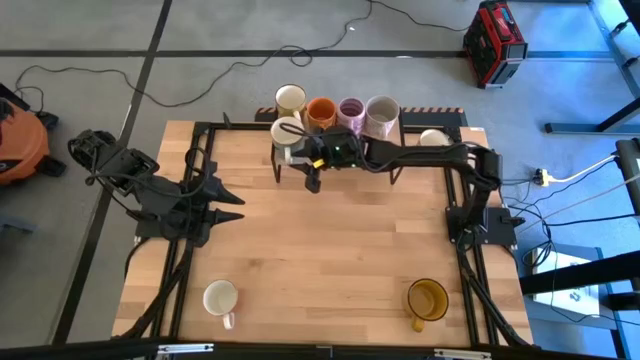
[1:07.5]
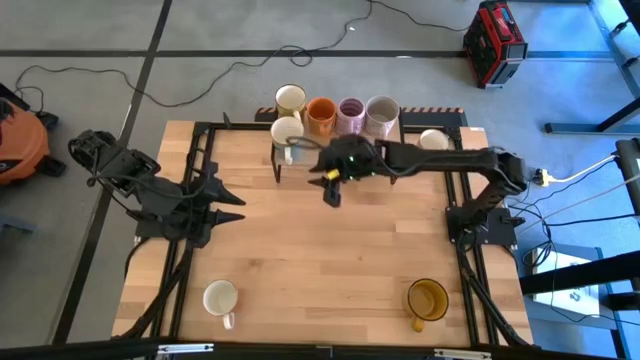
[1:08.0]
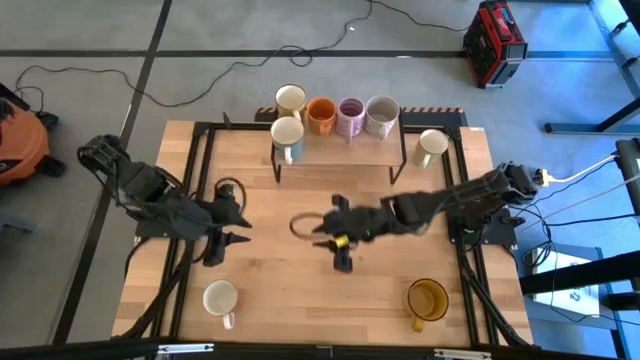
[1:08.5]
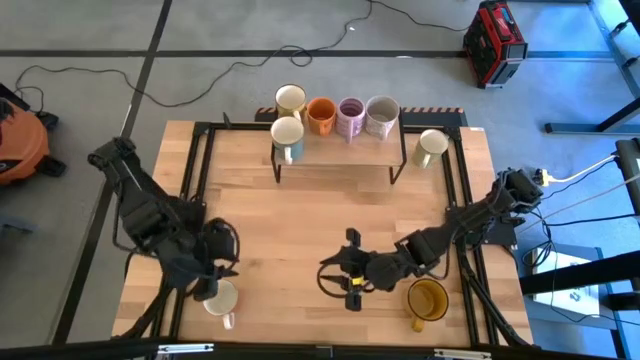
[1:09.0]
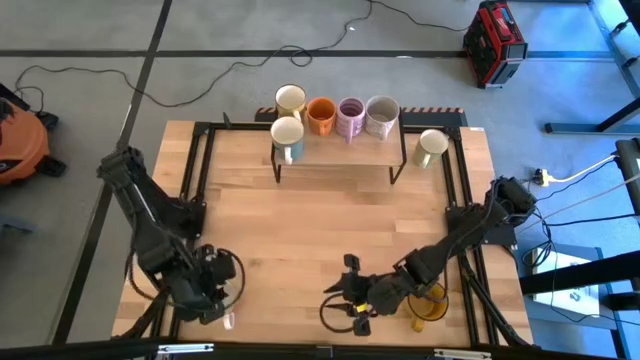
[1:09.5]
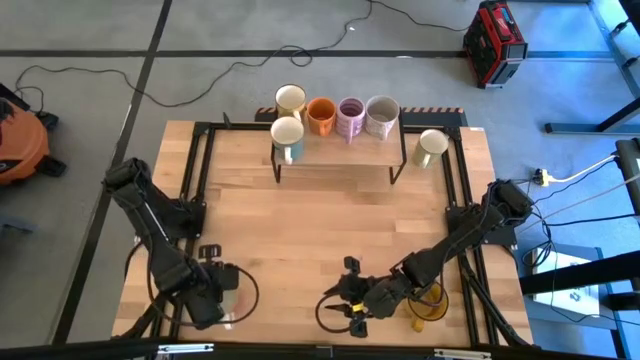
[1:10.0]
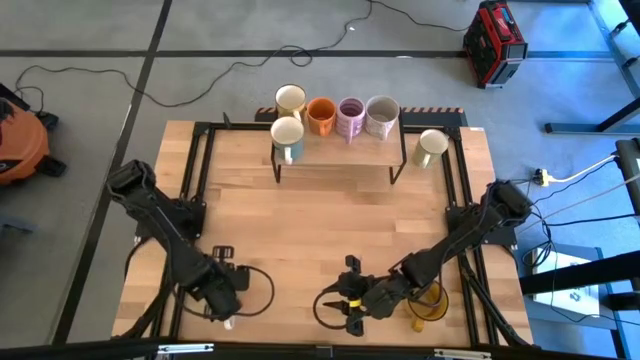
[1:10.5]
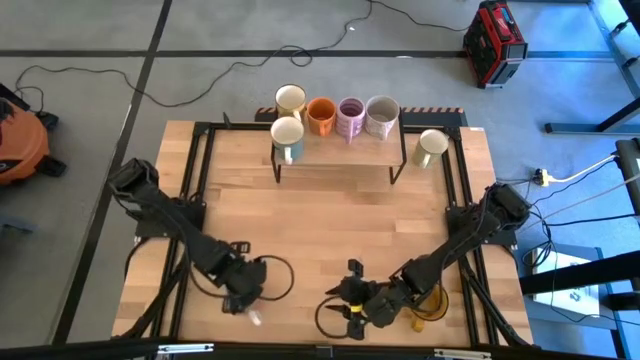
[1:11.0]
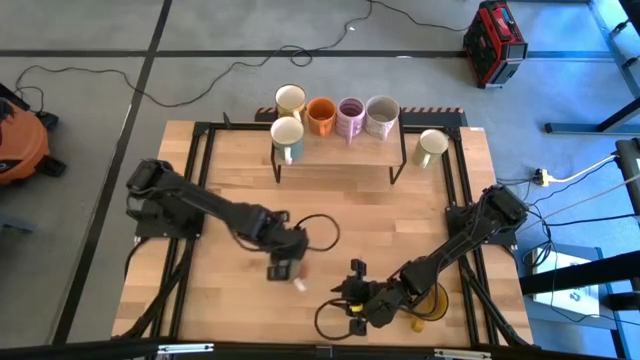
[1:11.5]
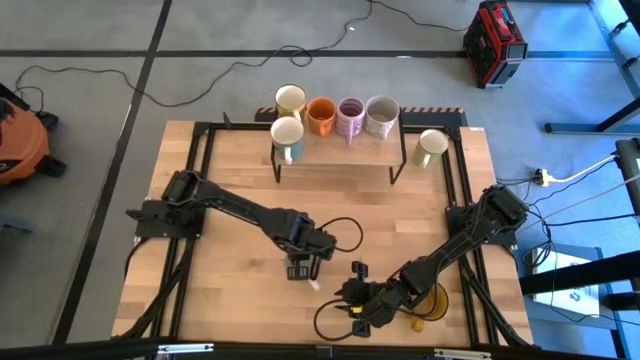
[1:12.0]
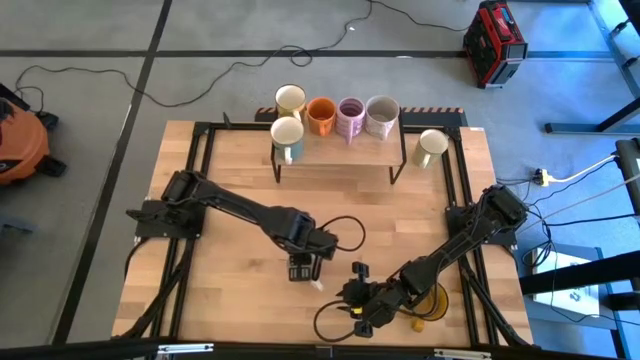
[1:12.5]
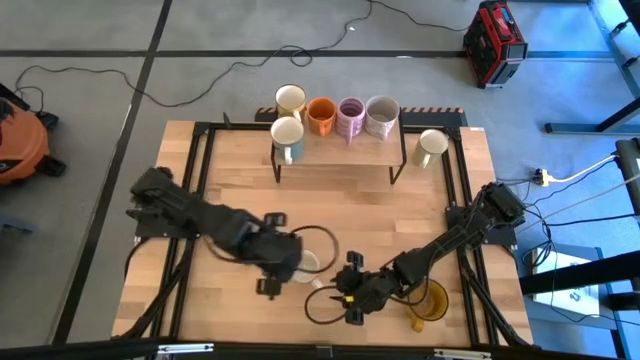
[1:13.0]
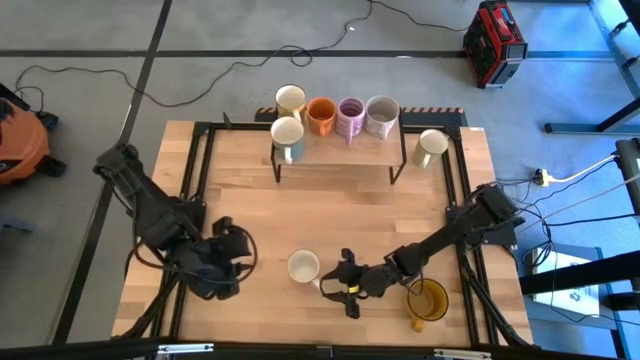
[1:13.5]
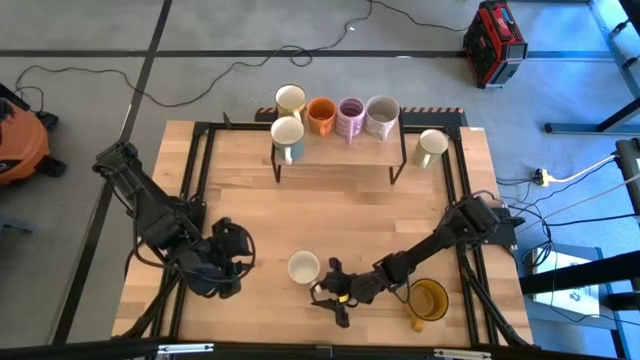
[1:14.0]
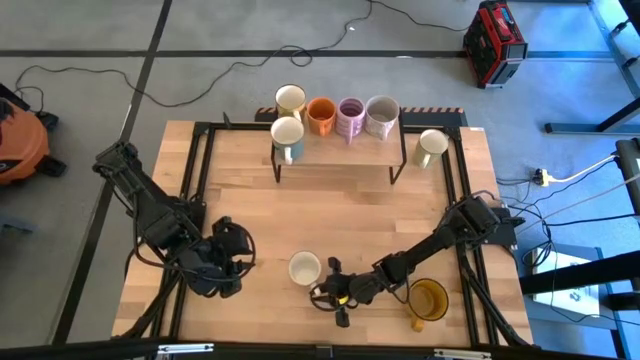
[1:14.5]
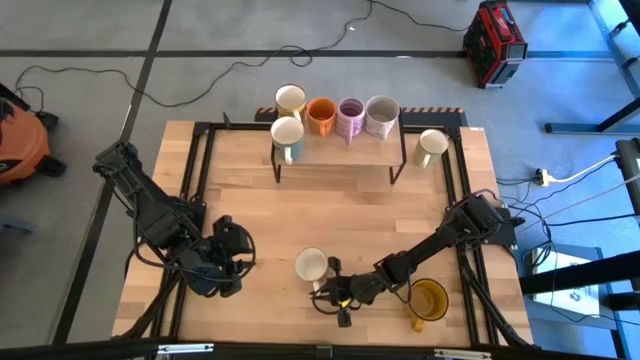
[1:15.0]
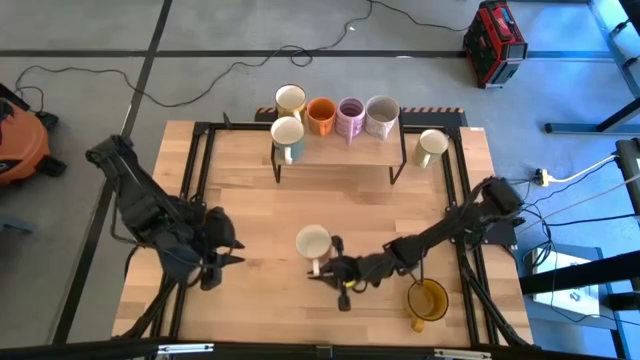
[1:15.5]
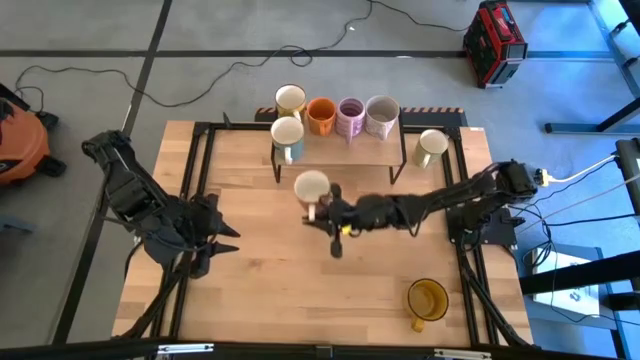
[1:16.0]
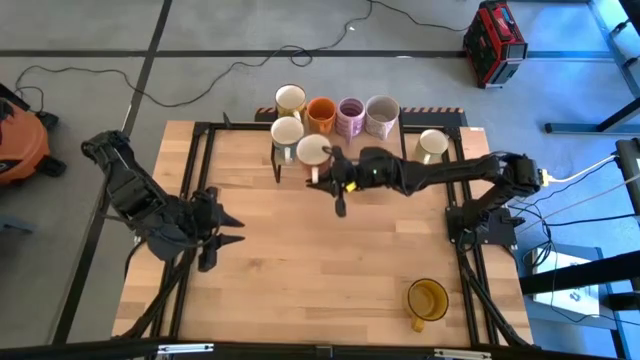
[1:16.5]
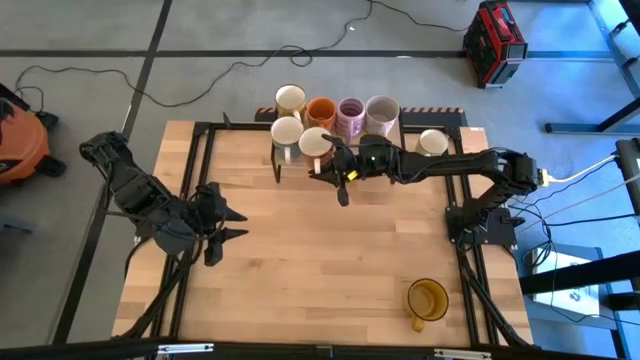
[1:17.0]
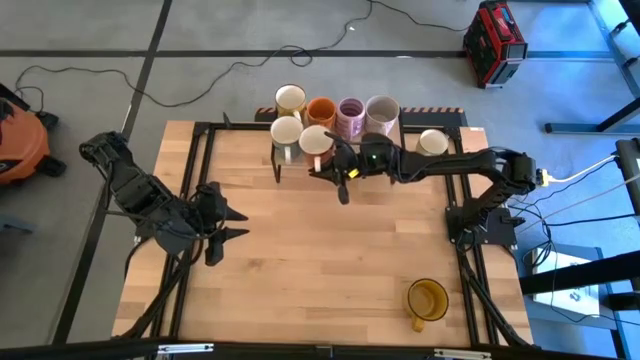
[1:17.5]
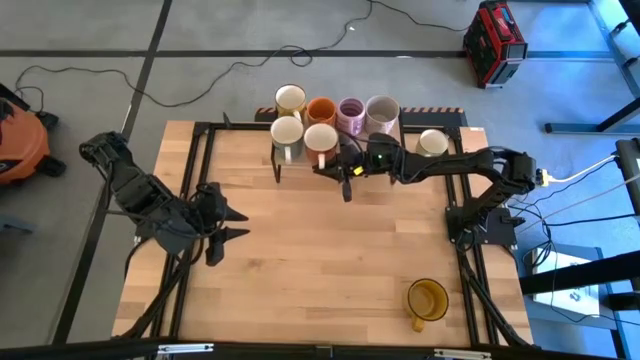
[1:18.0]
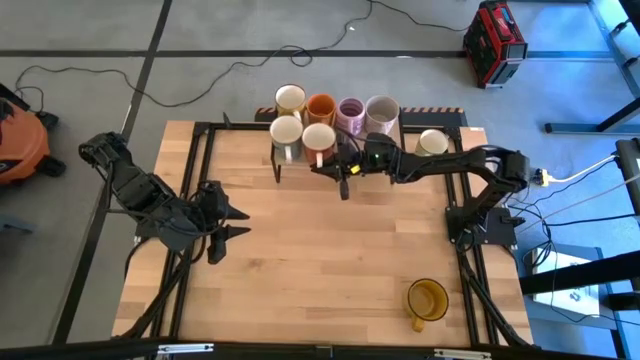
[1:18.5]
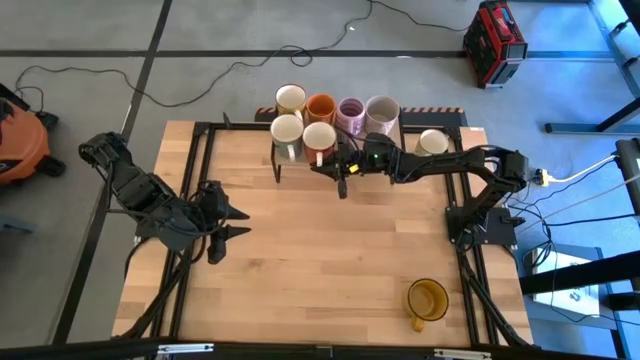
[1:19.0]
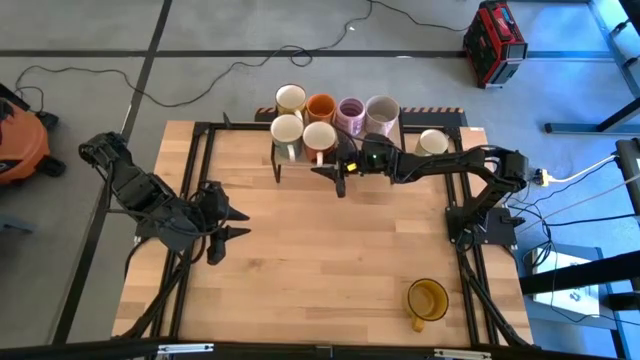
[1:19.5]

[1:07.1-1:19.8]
Task: Place coffee mugs
Put the red mug on the shelf
